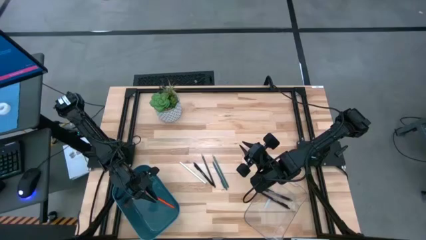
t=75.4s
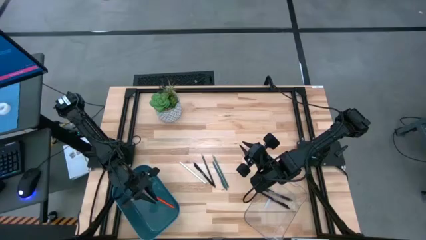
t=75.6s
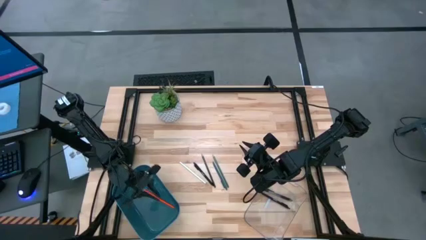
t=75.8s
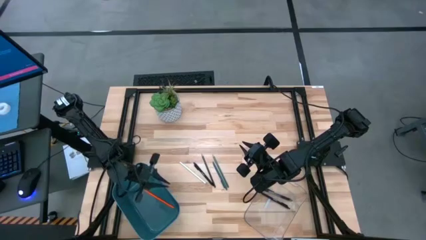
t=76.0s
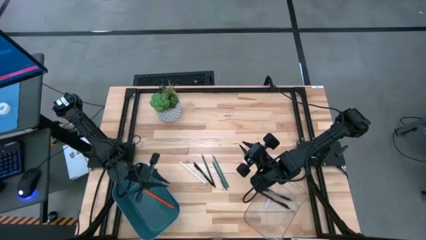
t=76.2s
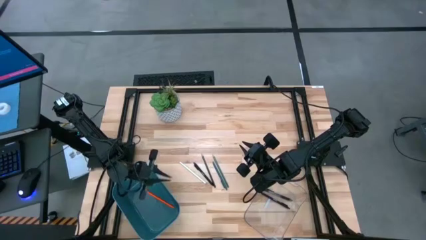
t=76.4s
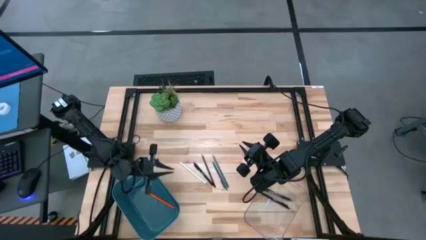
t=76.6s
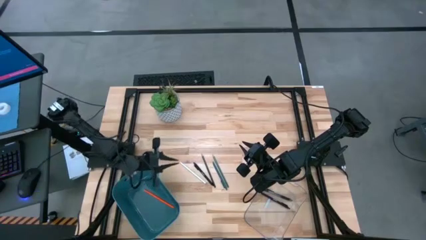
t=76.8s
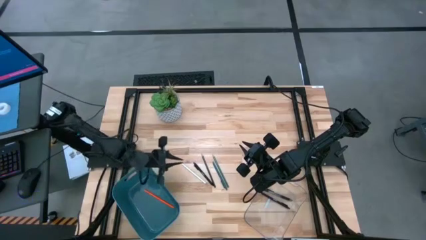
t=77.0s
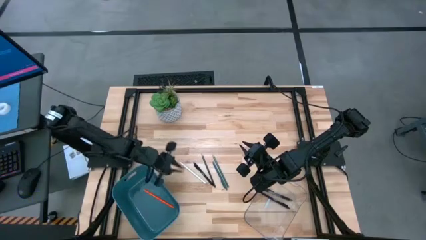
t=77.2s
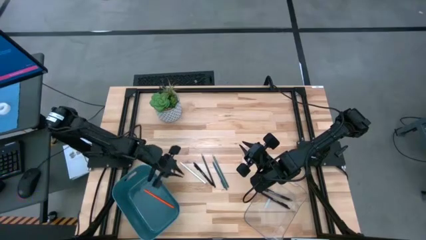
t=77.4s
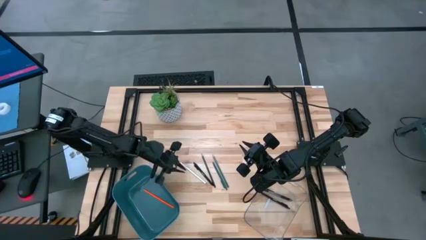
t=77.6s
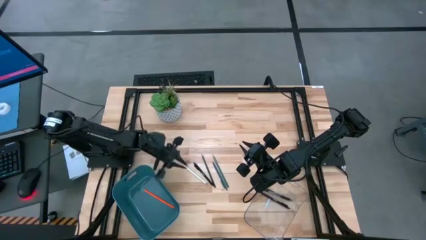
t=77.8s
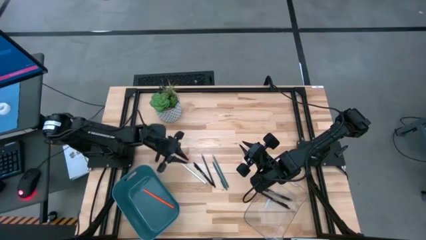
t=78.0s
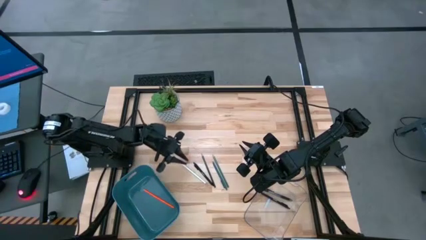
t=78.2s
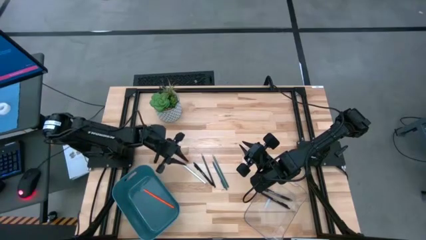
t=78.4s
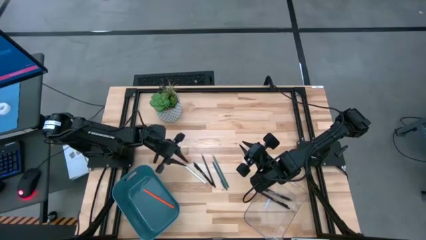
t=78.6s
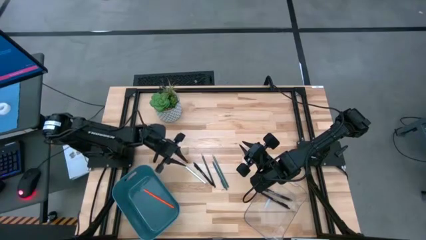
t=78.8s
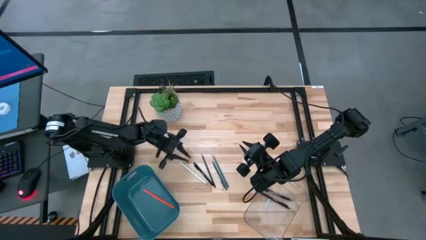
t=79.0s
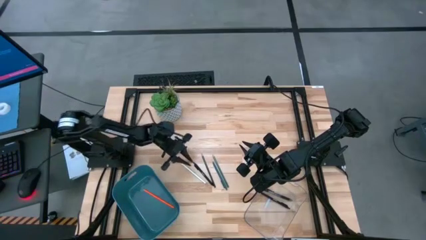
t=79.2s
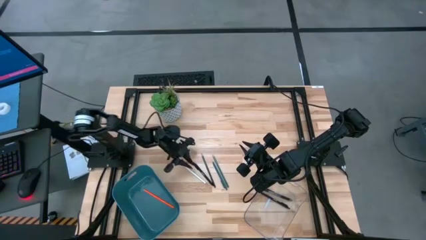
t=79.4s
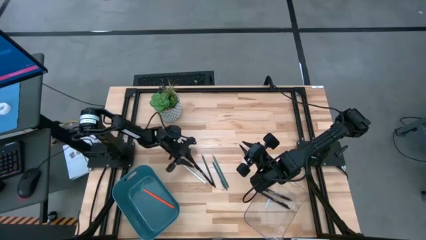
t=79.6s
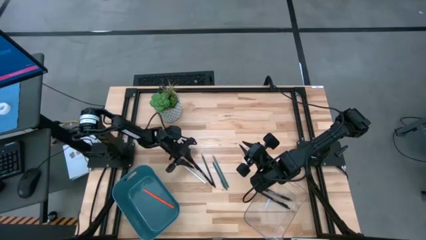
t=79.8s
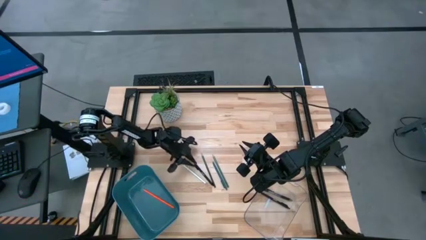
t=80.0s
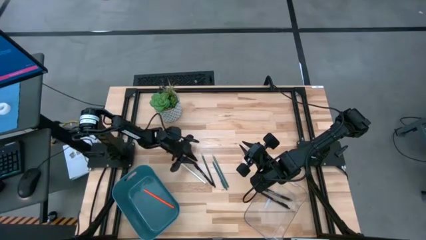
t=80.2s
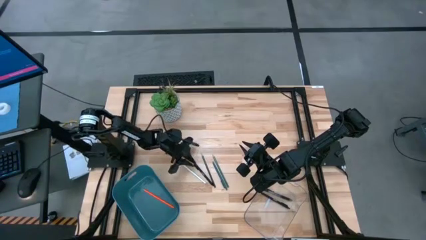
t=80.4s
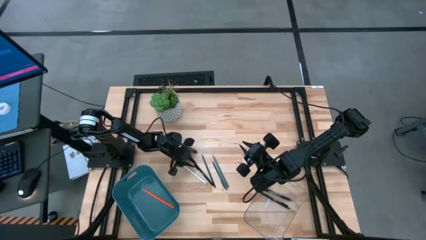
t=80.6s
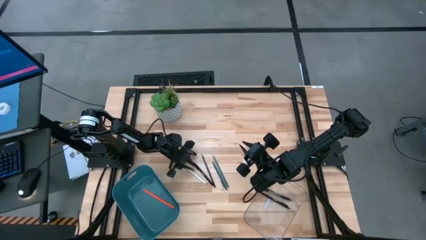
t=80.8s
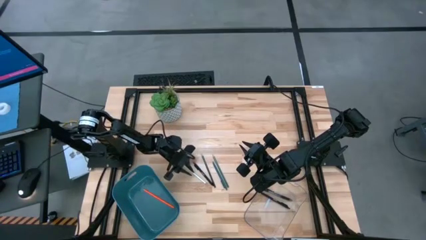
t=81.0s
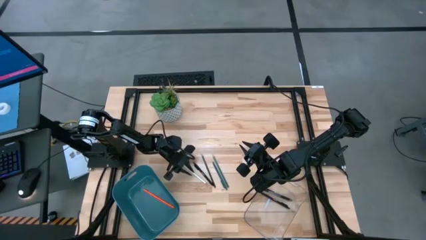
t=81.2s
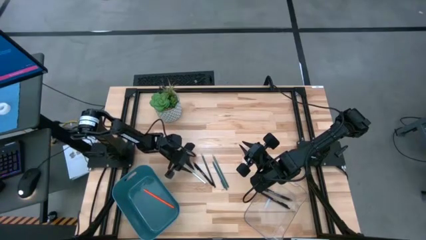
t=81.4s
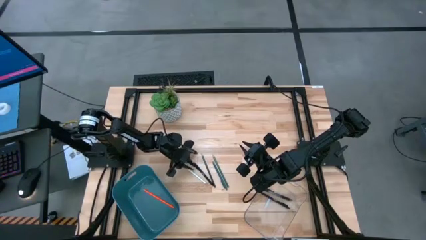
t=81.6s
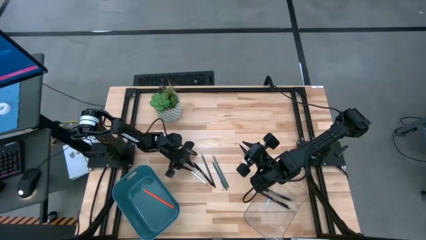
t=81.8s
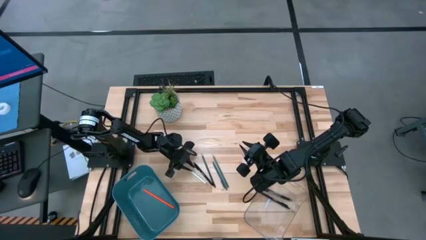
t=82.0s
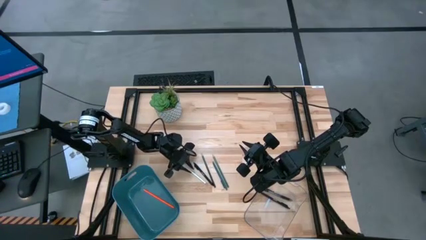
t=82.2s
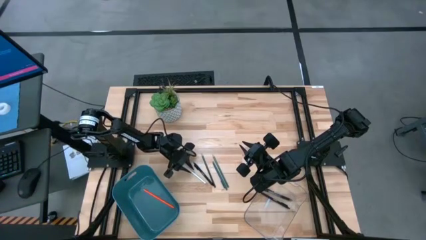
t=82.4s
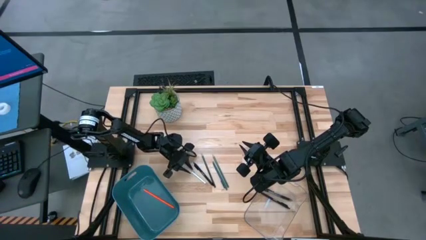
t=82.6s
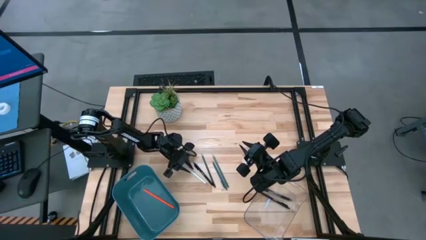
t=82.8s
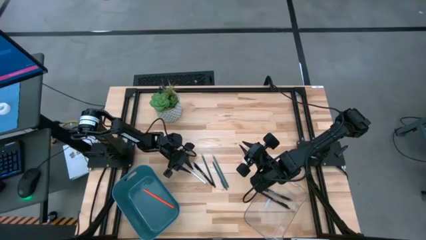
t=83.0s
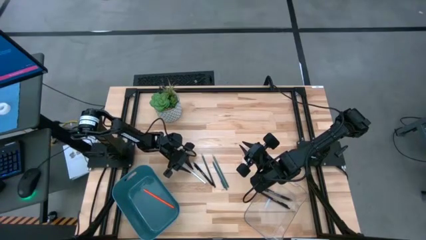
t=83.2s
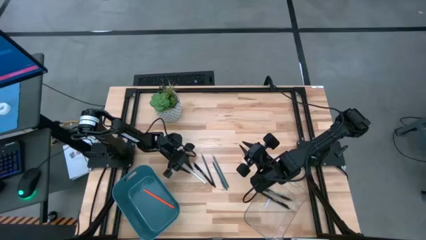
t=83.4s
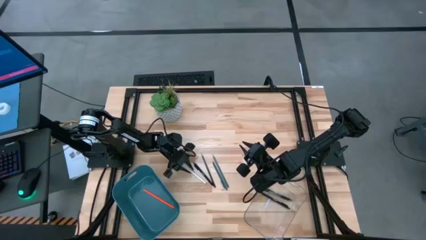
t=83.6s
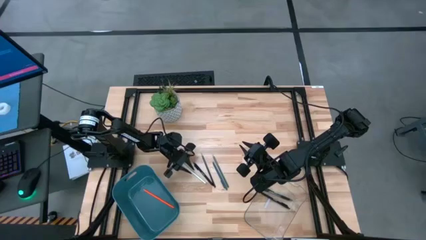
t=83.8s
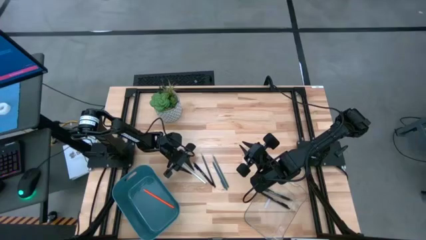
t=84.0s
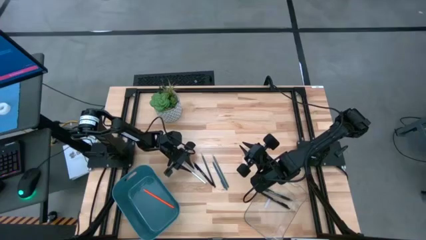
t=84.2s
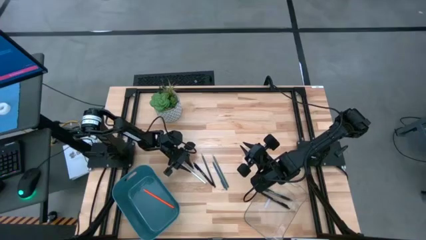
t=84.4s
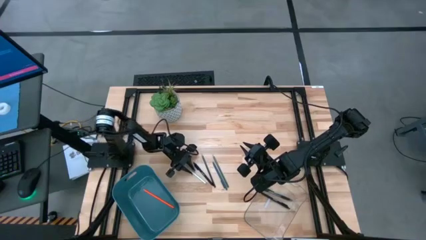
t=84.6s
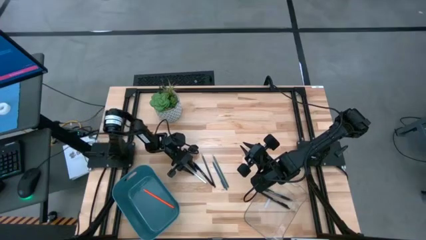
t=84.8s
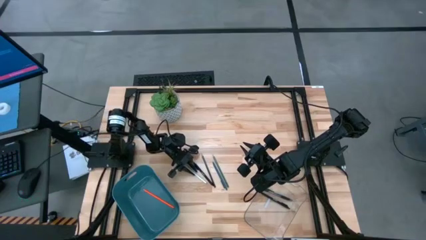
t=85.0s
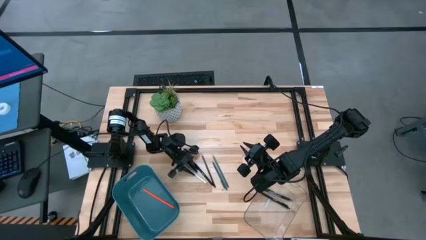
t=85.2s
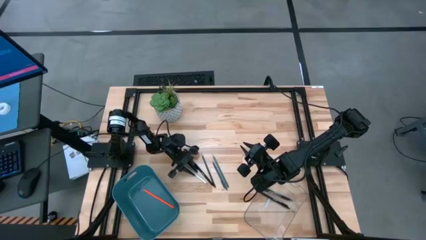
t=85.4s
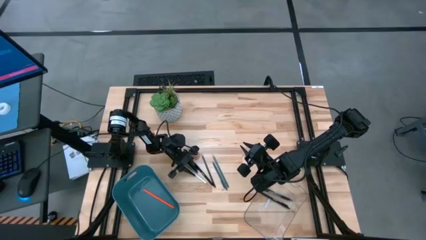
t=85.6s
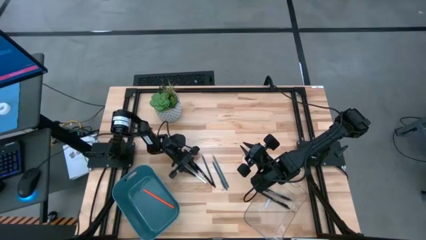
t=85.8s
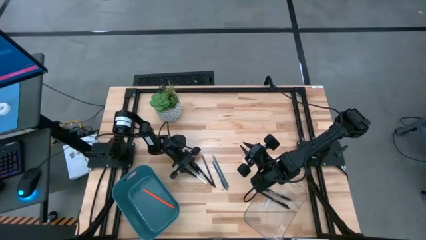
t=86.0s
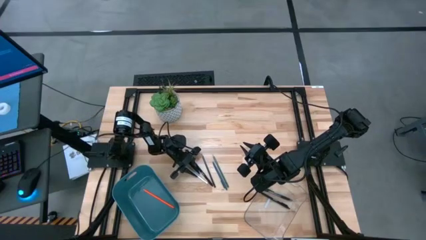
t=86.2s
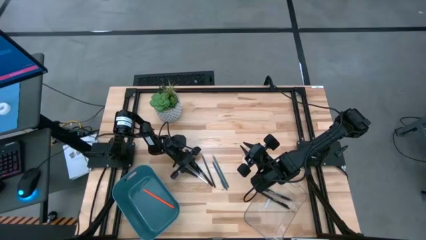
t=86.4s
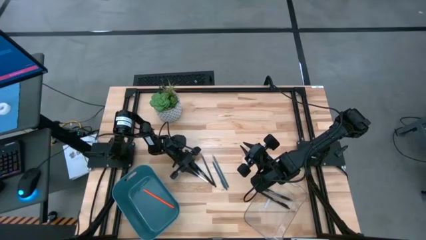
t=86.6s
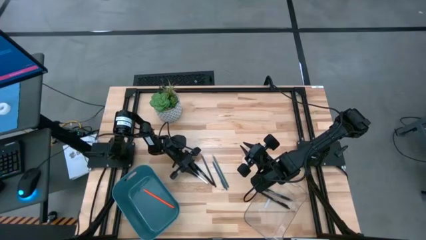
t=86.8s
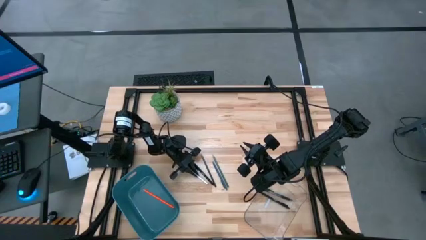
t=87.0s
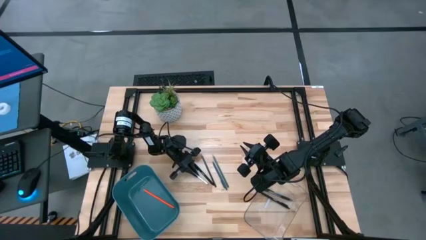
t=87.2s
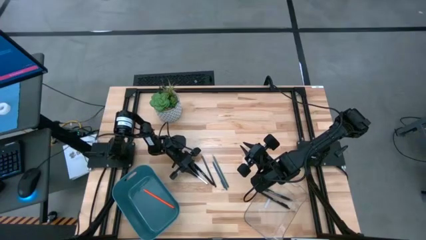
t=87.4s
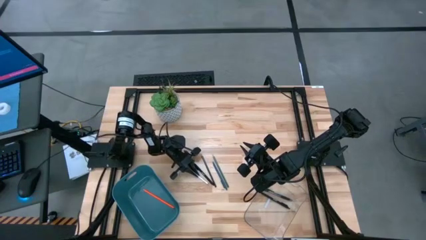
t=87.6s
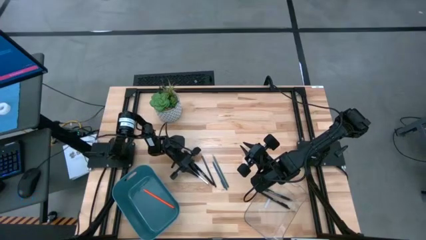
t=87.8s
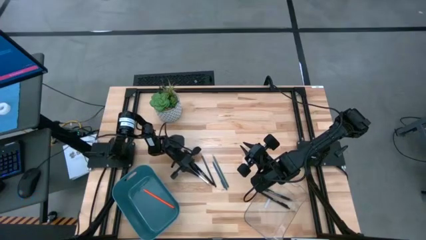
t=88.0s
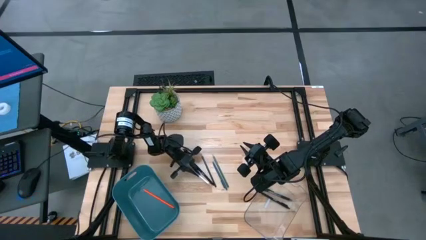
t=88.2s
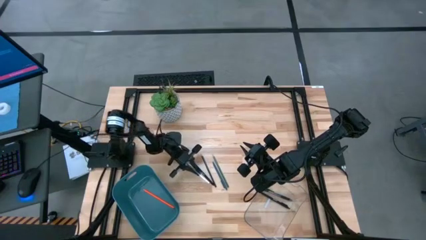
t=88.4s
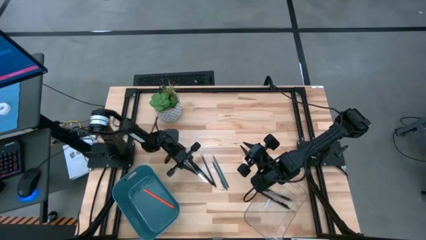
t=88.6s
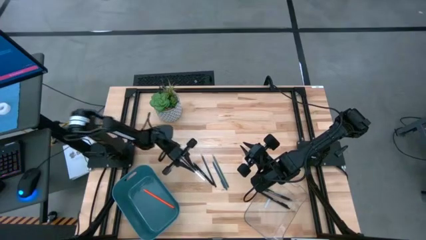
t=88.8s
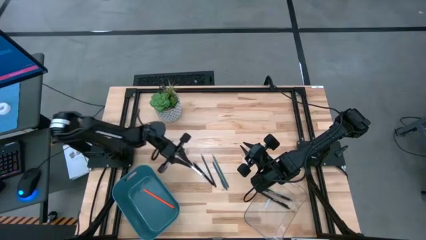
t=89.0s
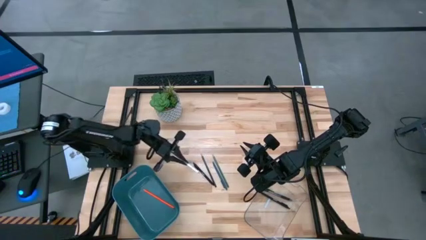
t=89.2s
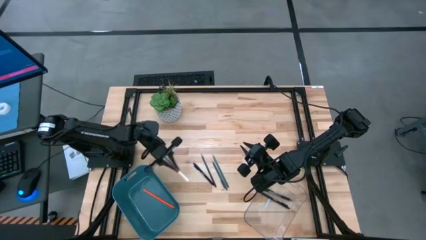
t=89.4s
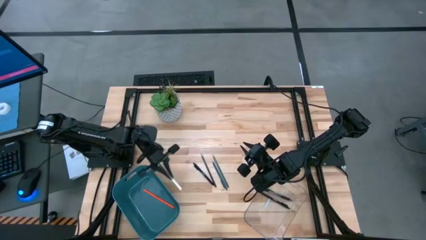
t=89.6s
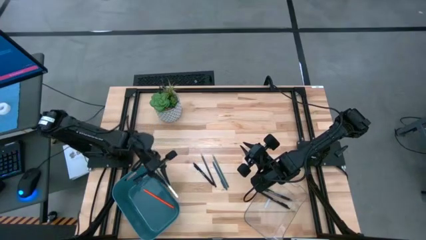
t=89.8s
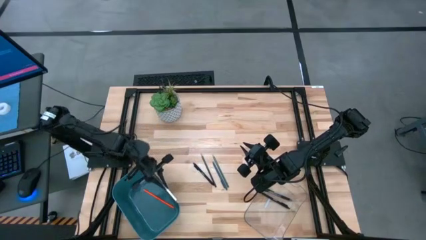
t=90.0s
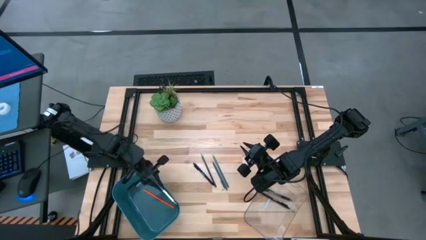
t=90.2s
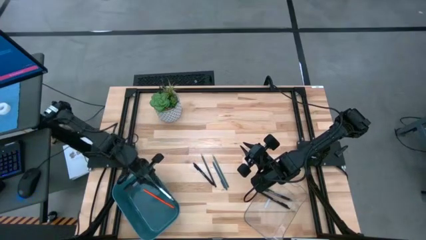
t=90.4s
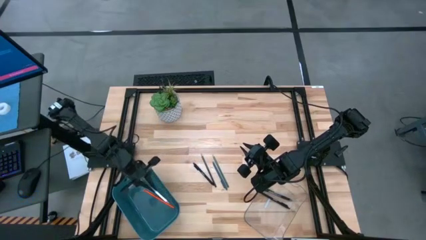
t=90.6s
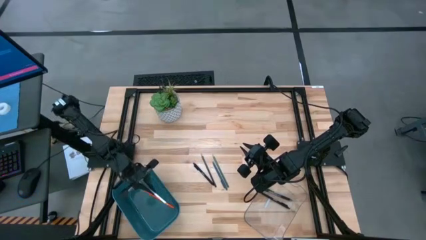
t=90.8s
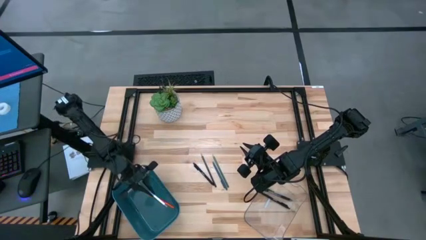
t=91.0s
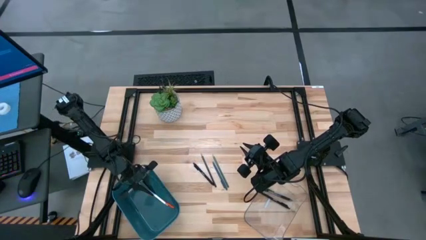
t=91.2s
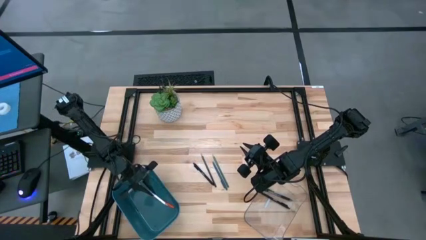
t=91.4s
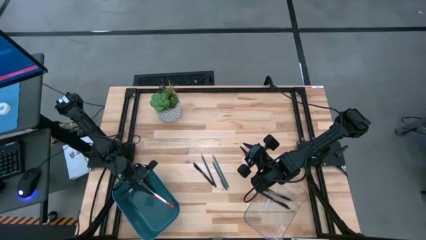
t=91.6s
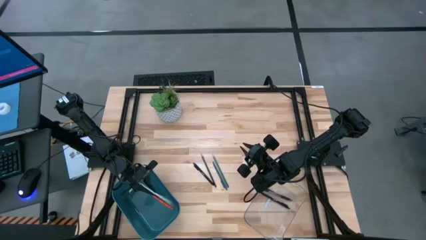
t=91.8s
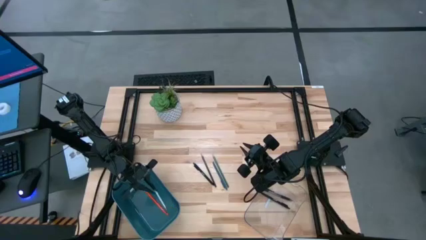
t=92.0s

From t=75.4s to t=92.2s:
Task: Sort pens & pencils
Put the white pencil into the blue bin
